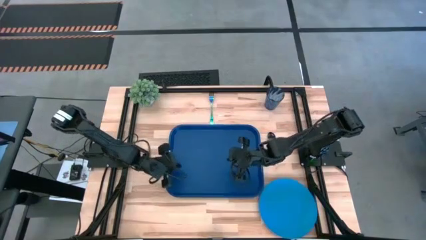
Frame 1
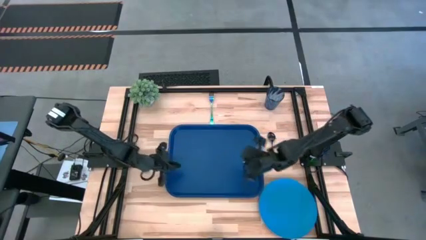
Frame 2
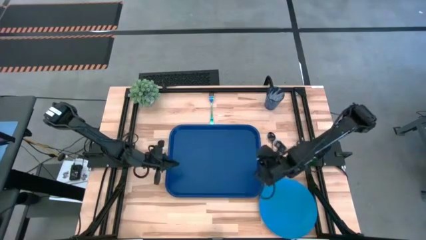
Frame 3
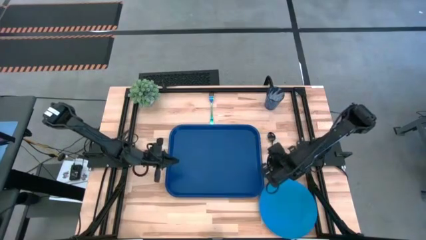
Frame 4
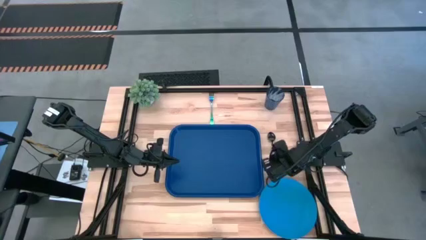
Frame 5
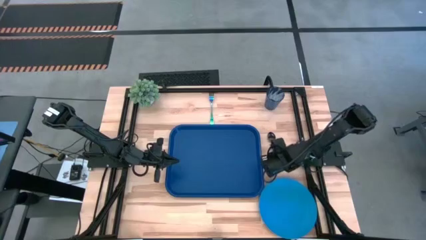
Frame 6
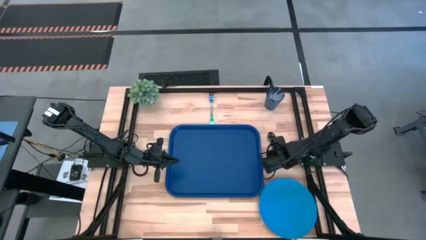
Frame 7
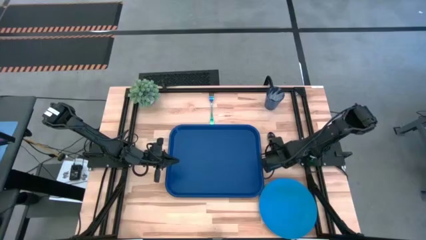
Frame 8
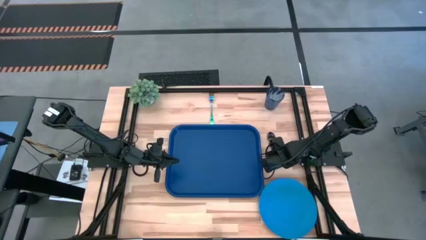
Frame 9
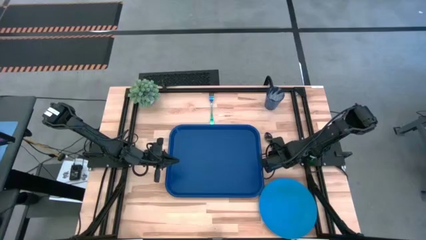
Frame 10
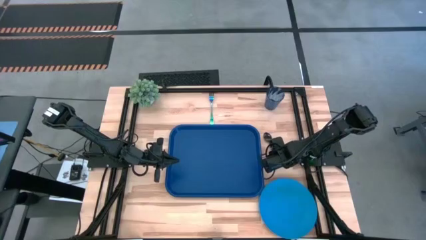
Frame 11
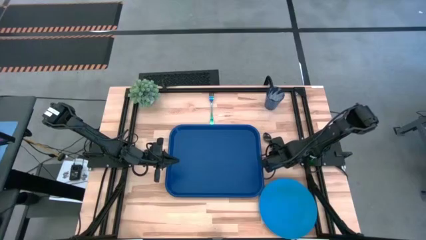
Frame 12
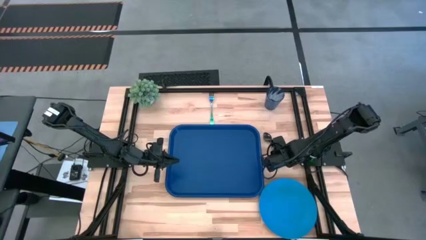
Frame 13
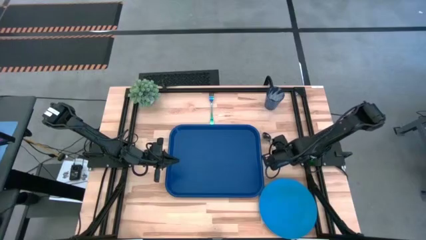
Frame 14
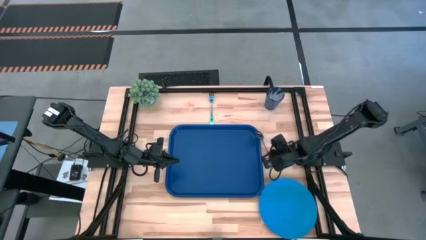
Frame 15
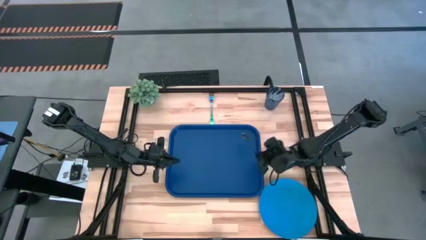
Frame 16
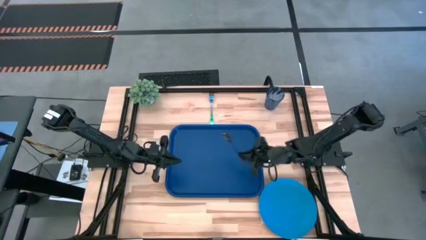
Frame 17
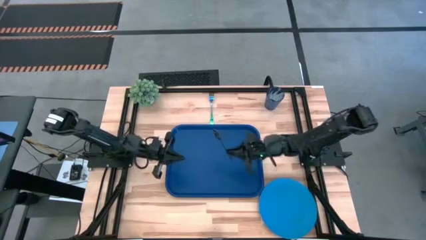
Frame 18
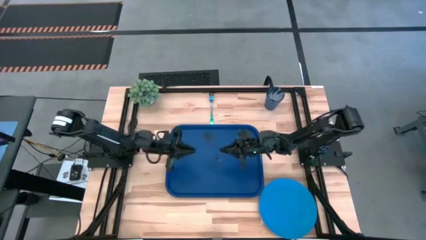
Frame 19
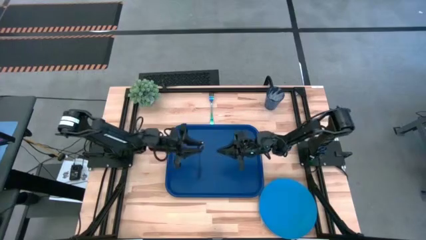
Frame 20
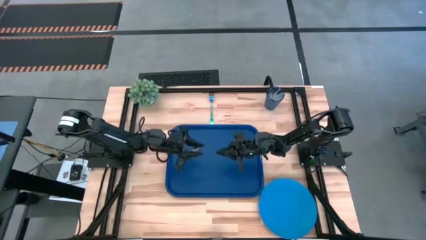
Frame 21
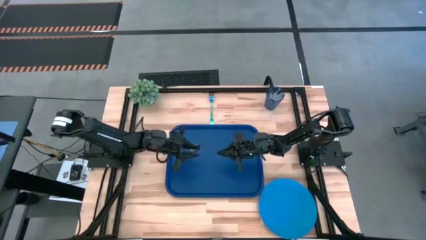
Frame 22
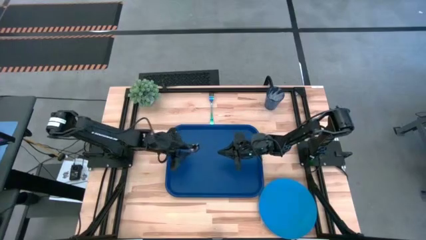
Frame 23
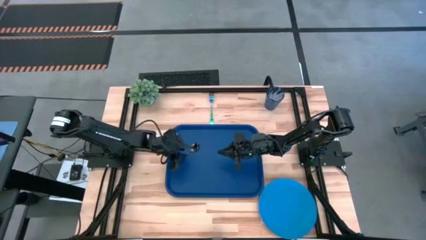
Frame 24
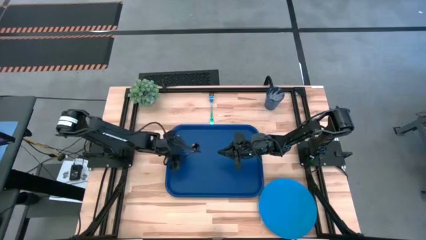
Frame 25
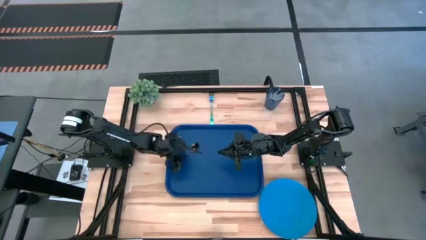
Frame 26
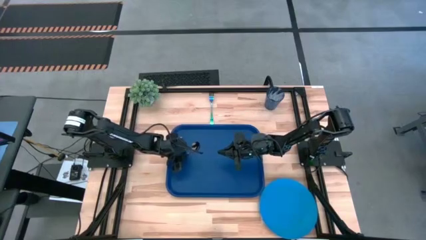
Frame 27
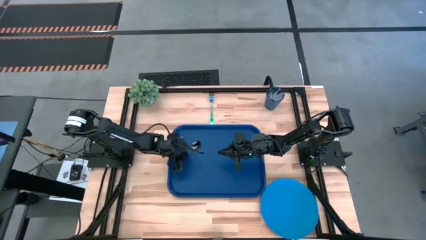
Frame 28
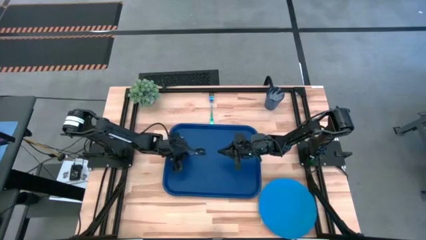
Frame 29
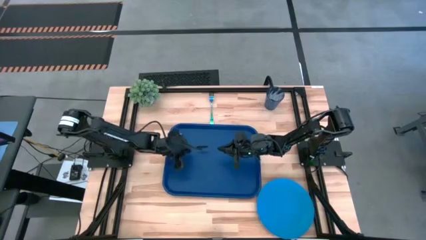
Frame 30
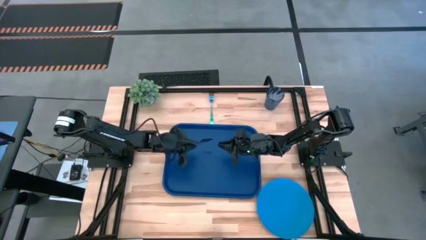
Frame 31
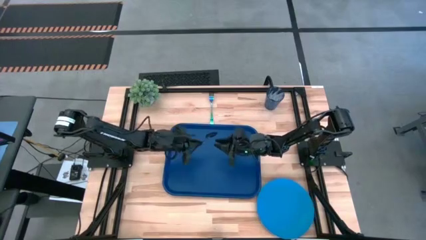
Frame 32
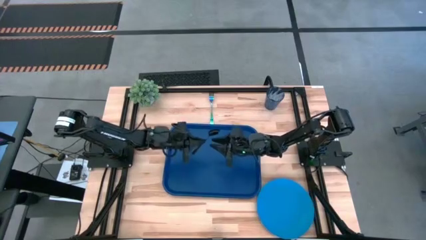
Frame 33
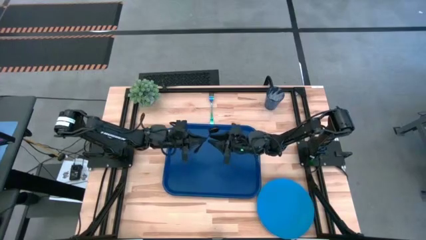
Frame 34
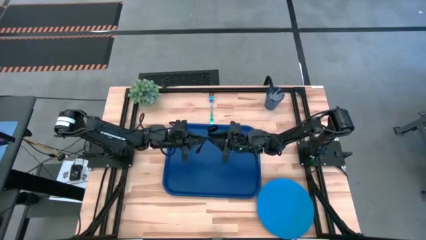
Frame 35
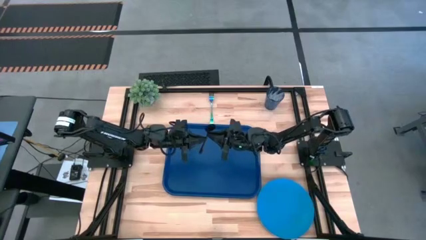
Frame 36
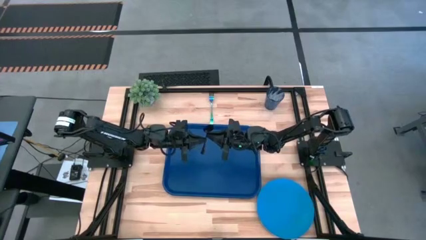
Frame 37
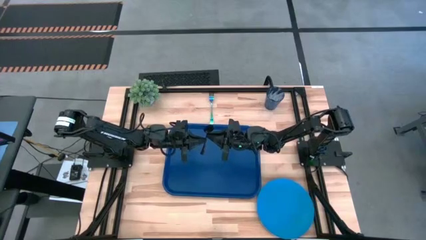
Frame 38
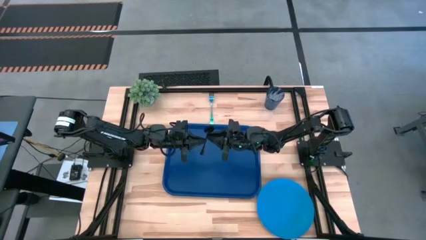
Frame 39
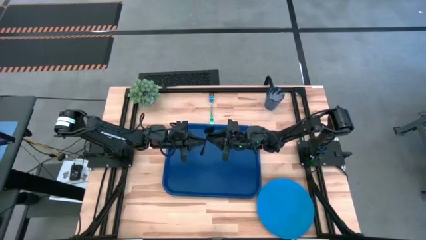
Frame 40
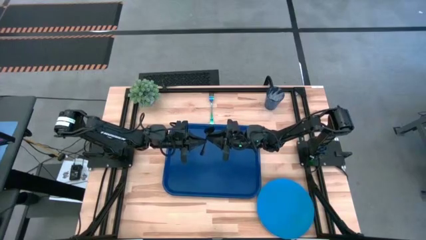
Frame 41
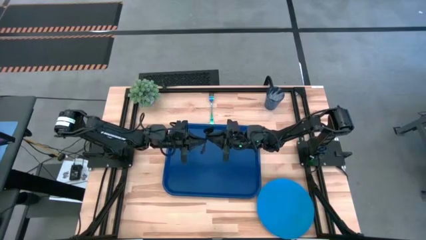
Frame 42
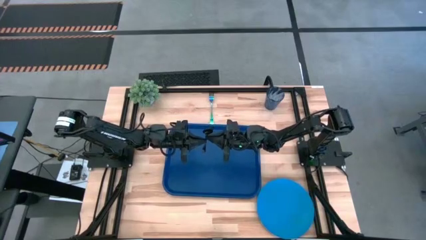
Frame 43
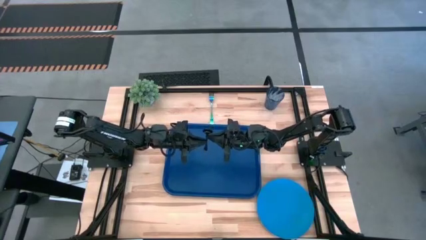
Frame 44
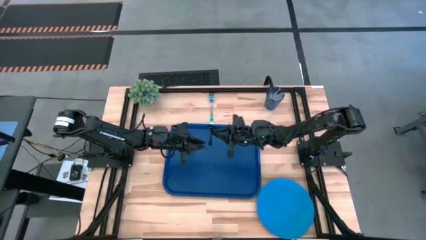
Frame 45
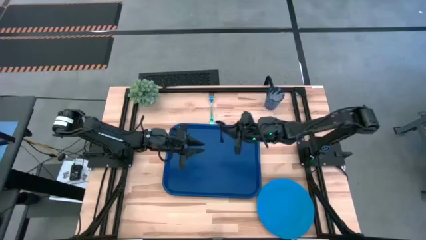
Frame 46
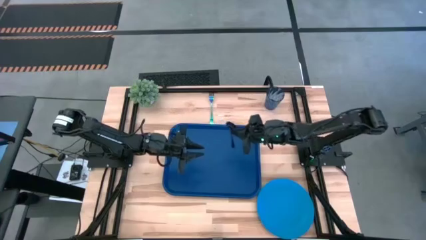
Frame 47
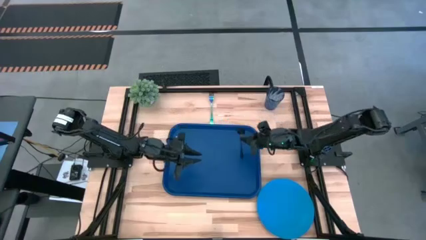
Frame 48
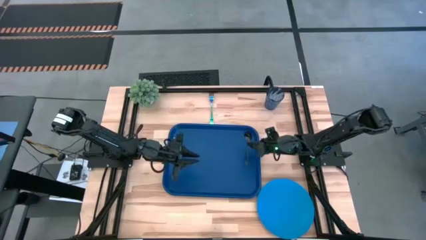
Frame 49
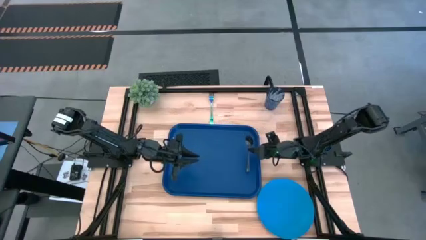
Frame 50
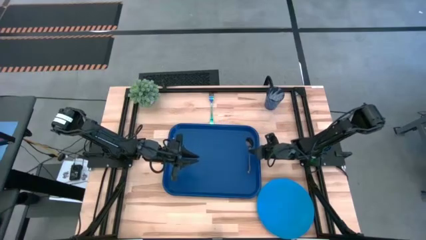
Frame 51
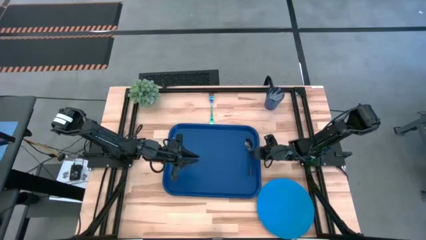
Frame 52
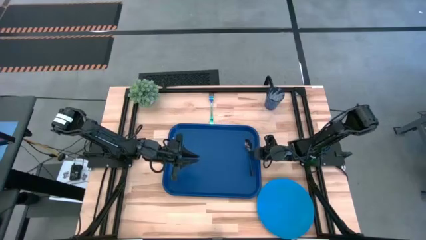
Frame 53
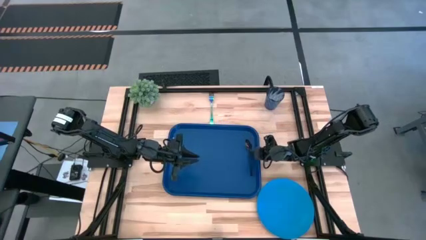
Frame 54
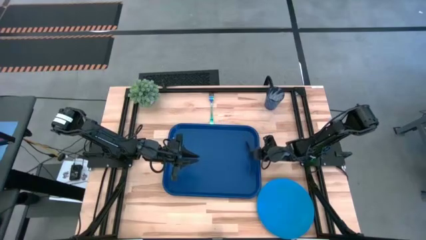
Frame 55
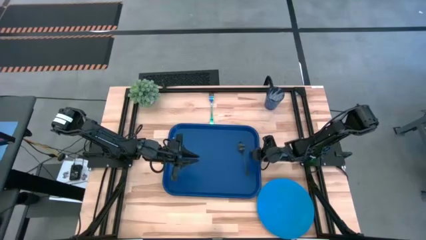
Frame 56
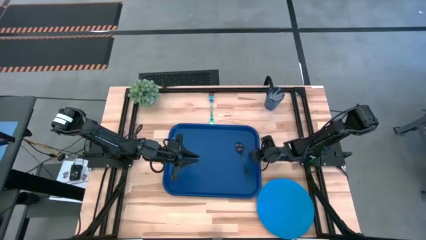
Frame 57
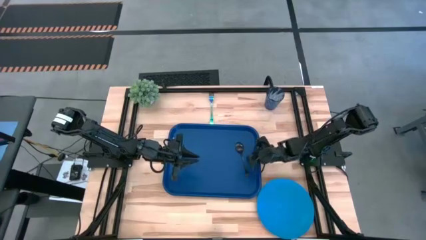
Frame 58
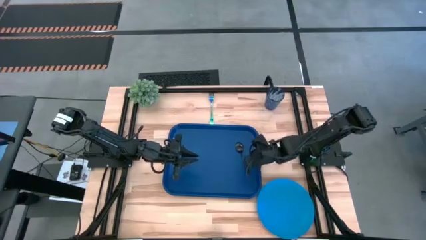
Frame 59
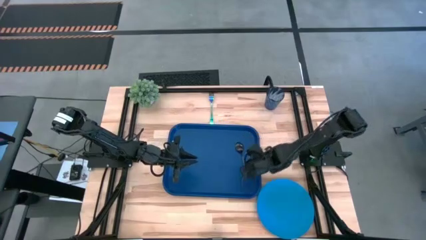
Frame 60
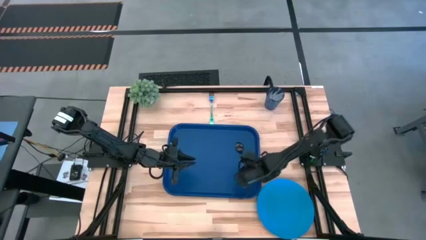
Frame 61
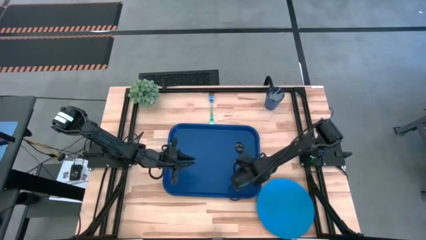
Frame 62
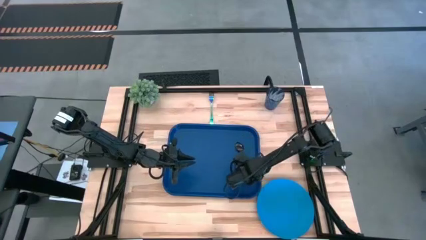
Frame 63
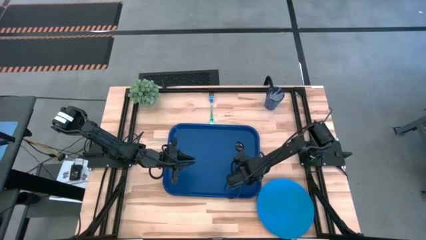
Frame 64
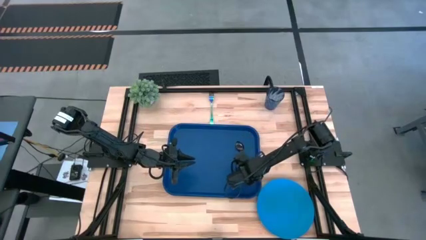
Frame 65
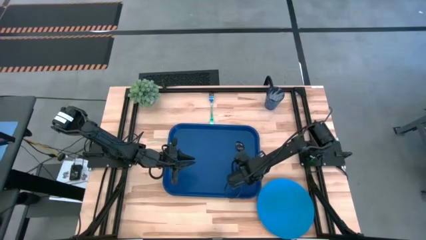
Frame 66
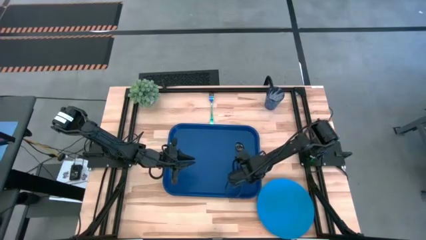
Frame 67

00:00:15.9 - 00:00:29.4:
Task: Pick and place plate/cup/fork/spoon on tray
Put the black spoon on the blue tray
